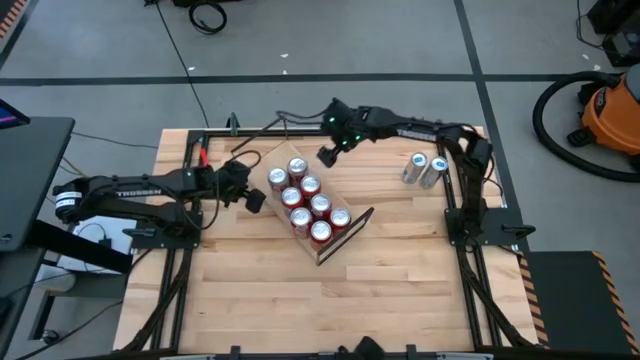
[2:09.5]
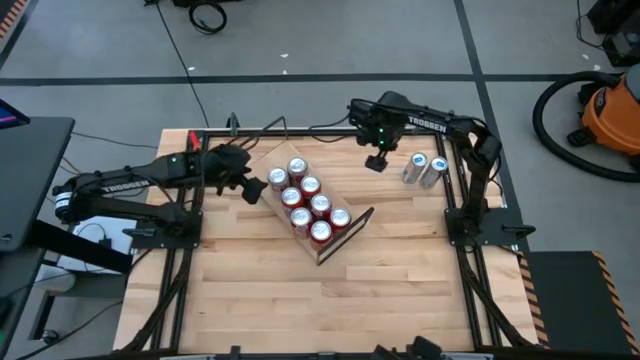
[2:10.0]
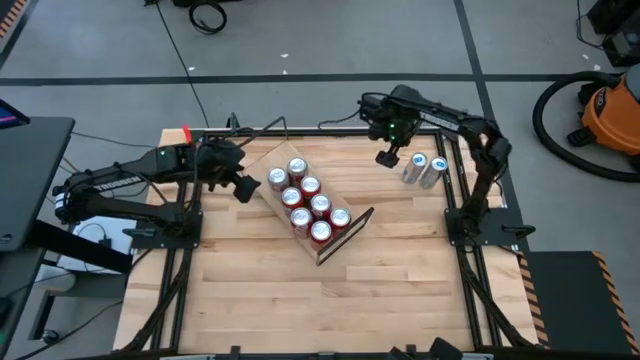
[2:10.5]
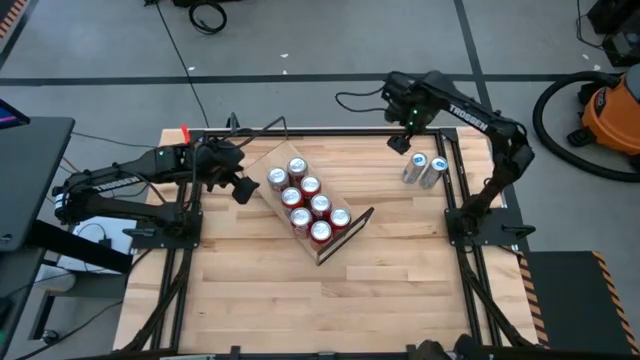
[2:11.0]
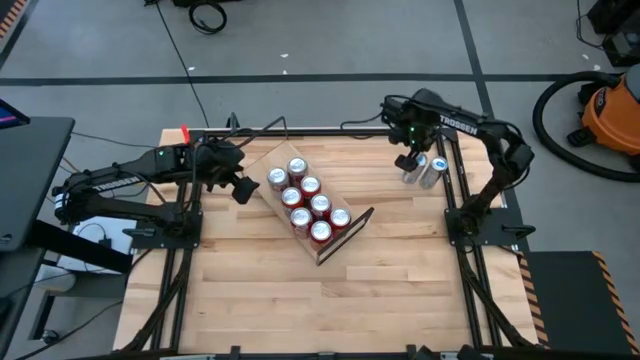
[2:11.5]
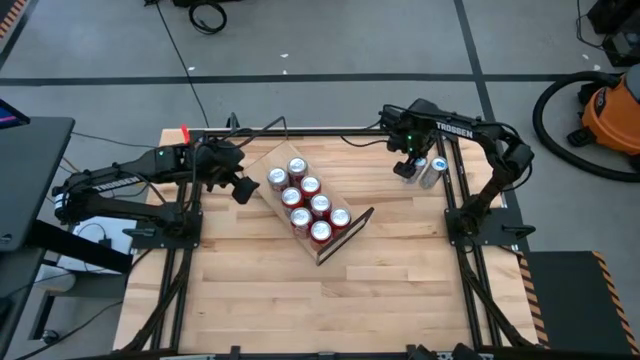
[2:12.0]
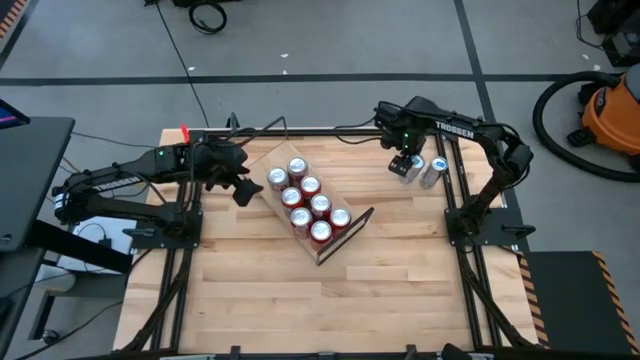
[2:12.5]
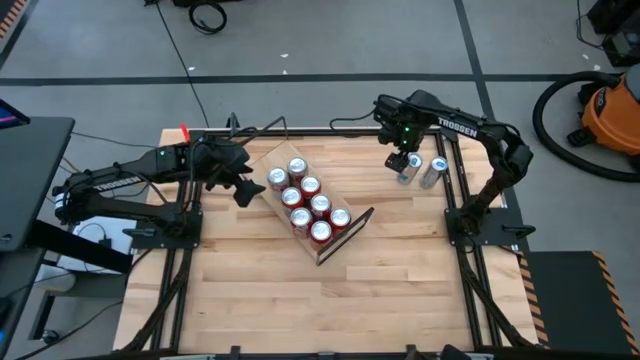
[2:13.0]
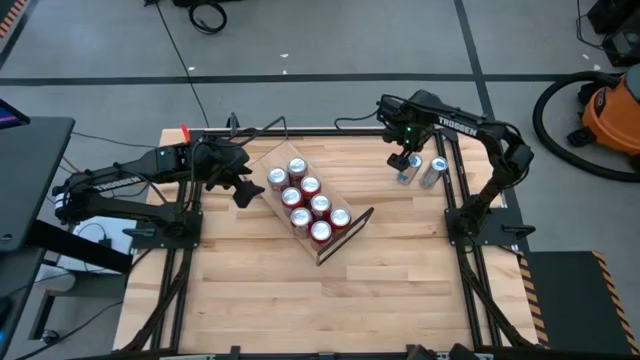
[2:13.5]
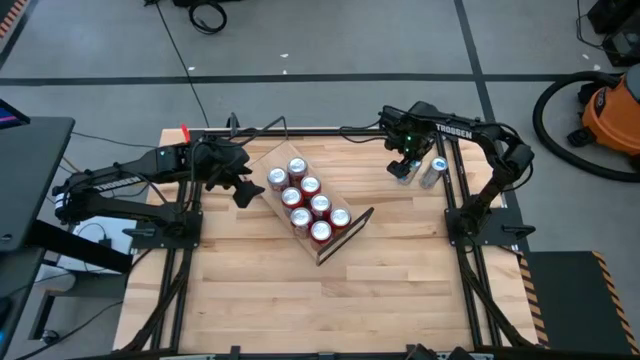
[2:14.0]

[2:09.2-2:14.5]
Task: Place canned beverage on shelf
Put the left blue soda can on the shelf

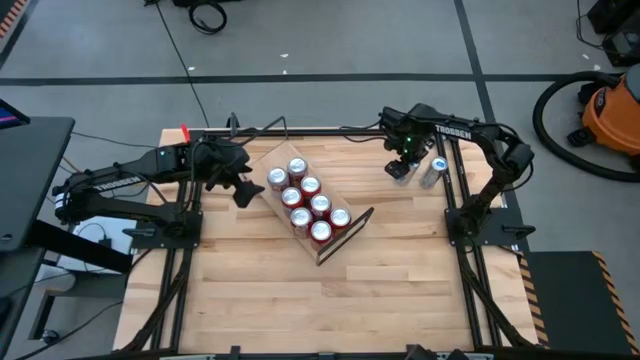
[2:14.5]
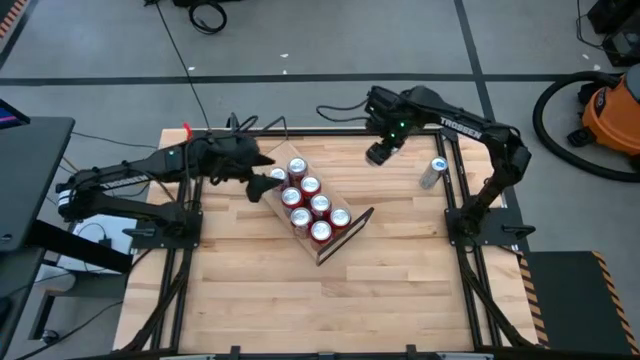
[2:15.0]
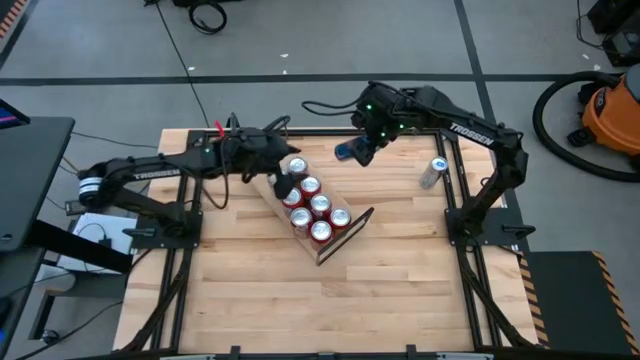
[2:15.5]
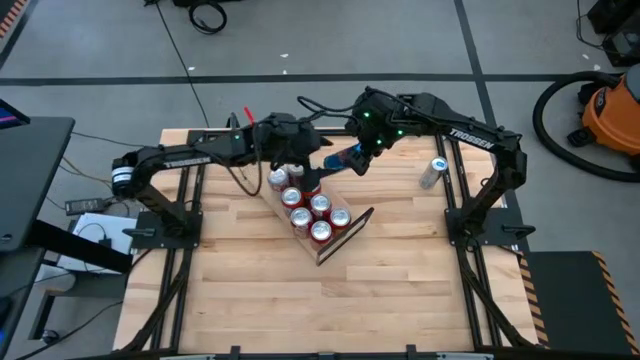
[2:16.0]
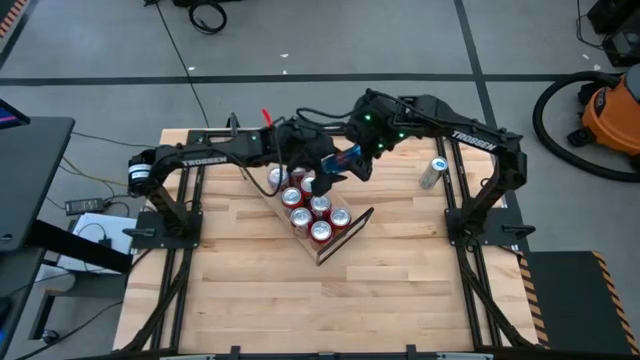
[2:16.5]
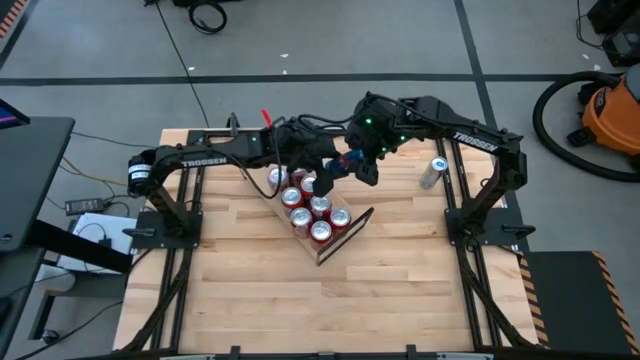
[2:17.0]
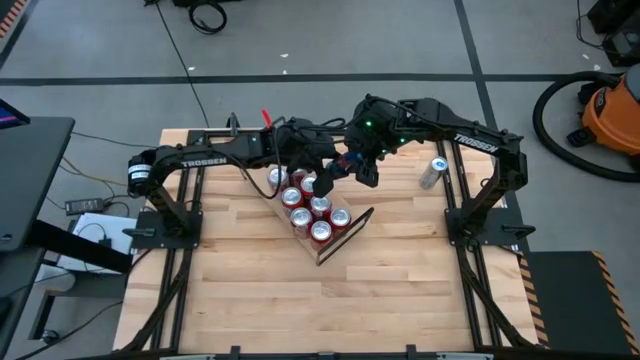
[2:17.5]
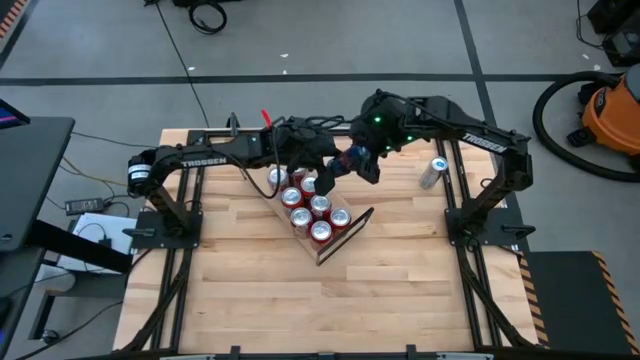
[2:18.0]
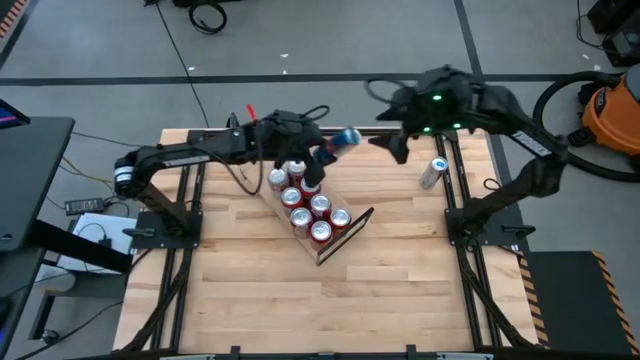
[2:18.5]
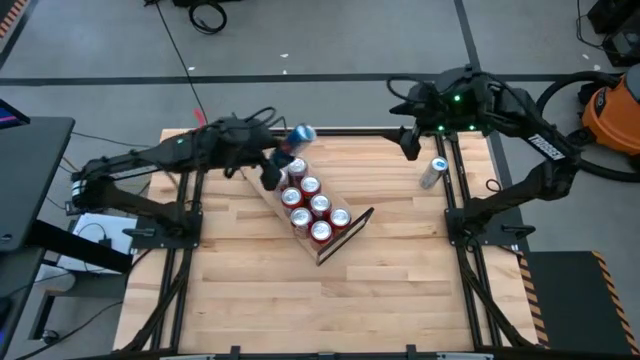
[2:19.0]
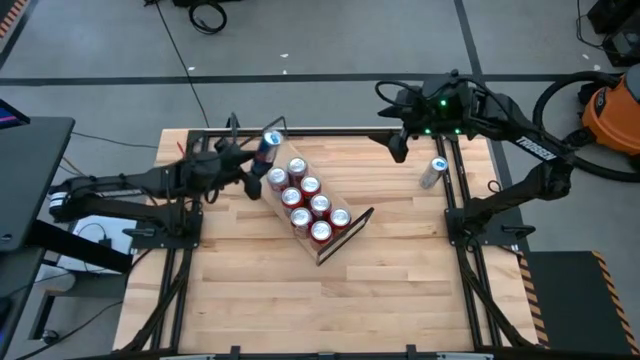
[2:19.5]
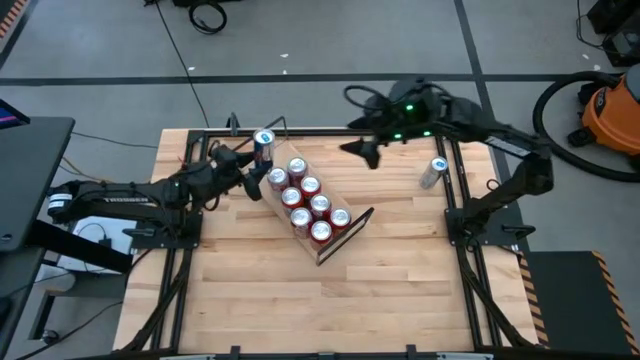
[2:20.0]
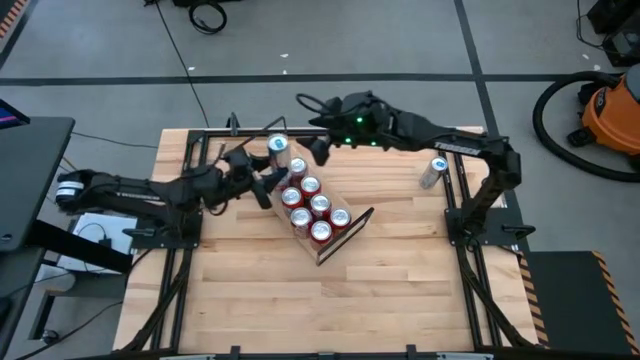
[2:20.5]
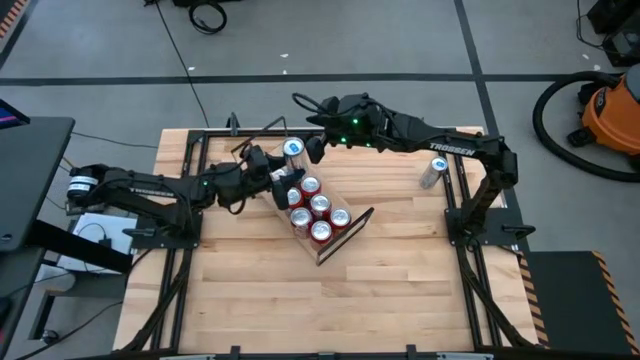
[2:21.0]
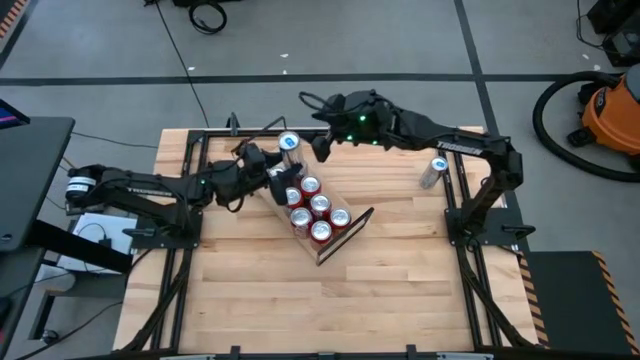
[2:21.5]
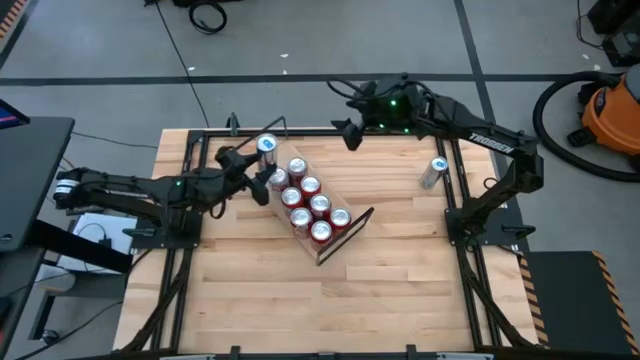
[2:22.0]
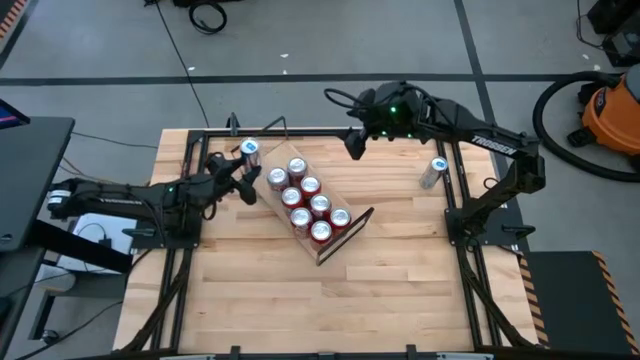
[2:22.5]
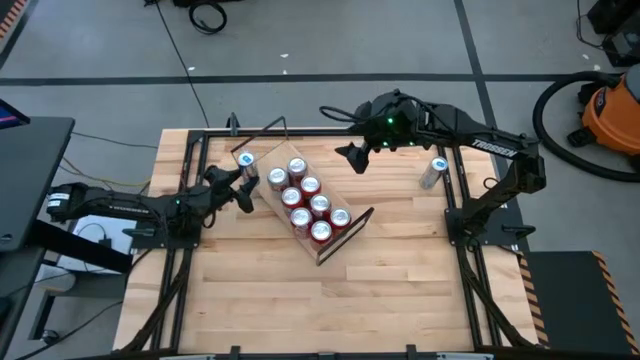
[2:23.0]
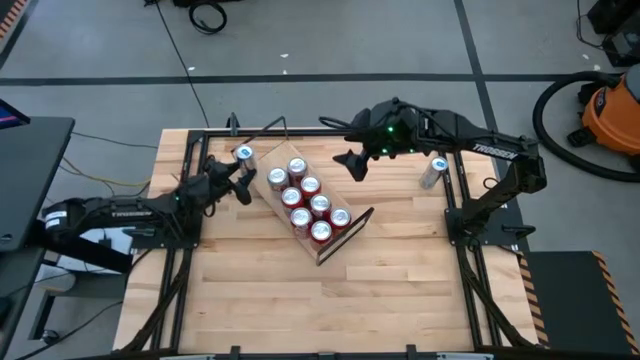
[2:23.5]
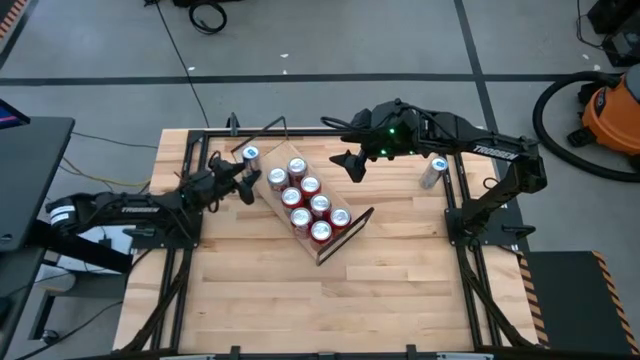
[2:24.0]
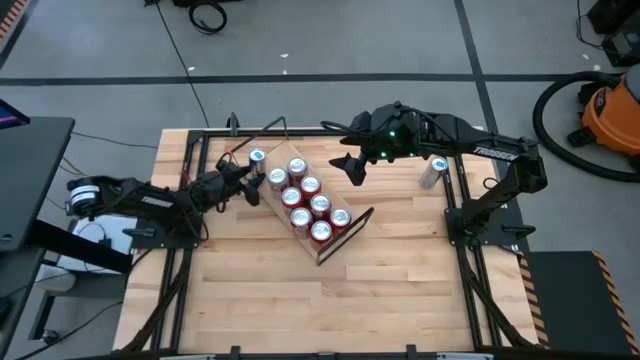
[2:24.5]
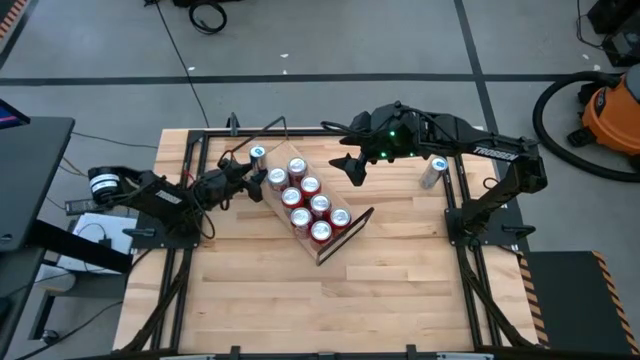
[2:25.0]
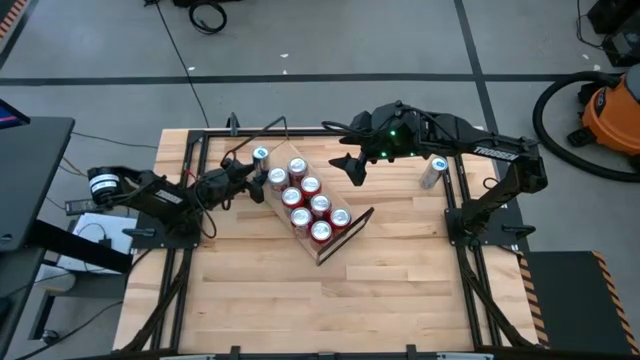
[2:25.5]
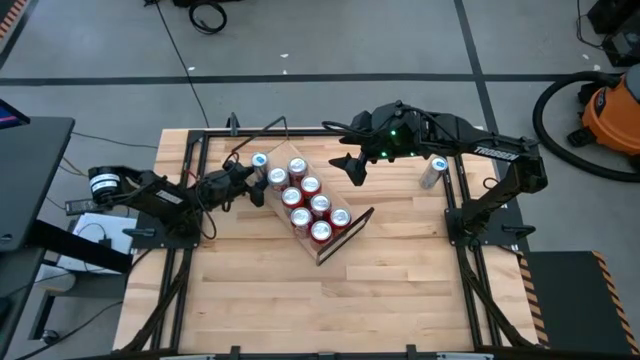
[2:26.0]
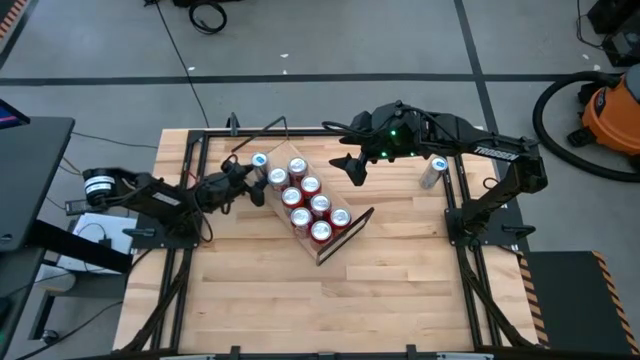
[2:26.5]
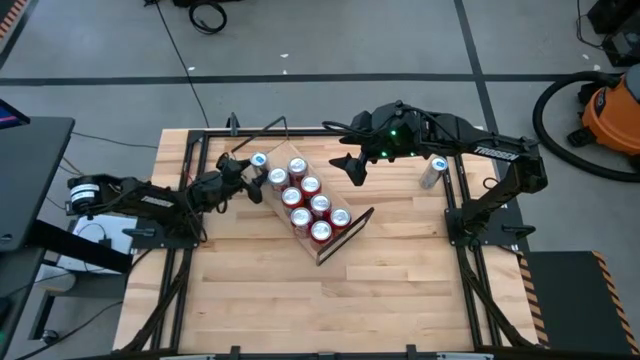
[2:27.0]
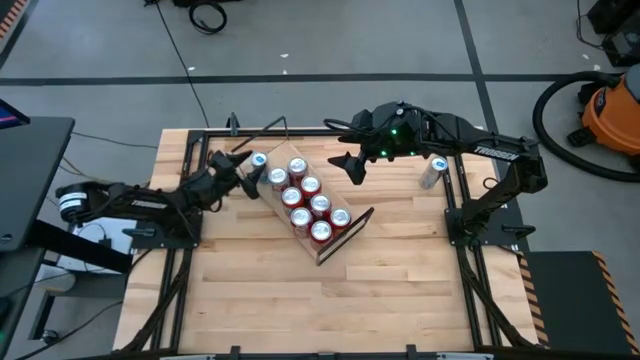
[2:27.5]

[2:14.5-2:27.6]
Put the left blue soda can on the shelf

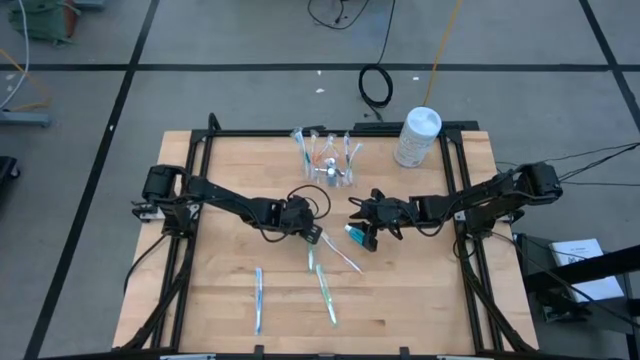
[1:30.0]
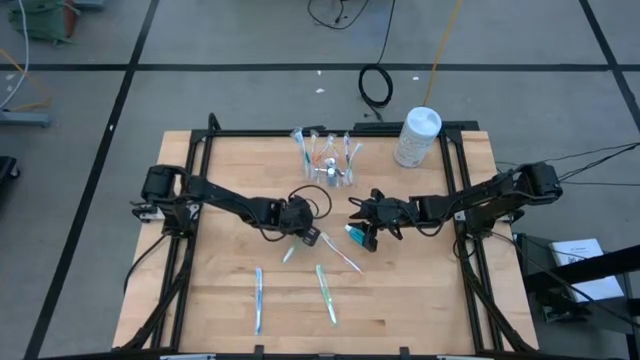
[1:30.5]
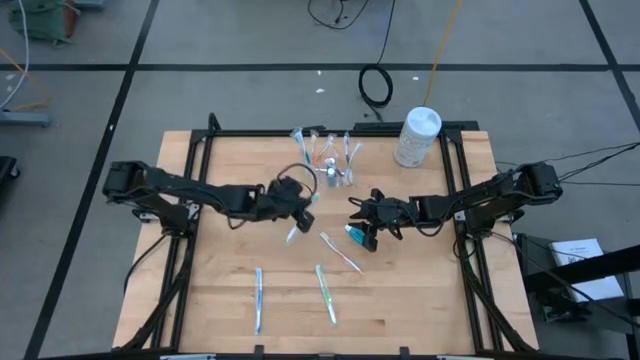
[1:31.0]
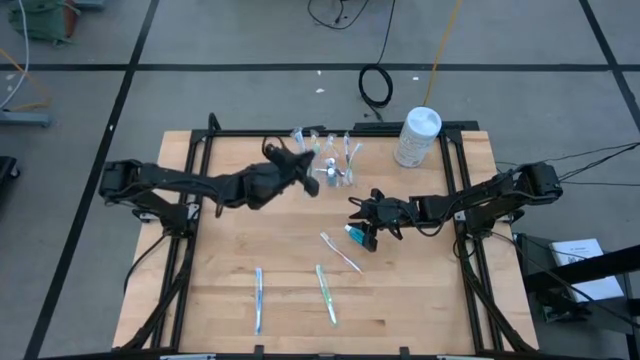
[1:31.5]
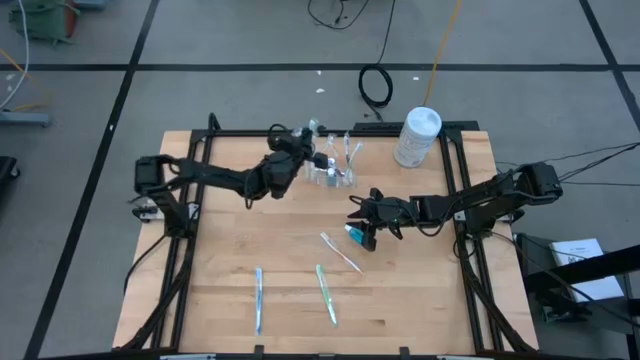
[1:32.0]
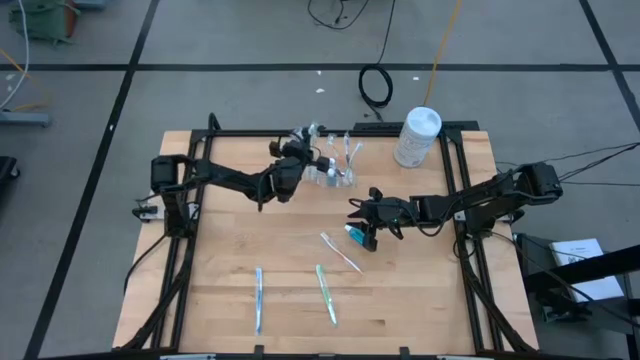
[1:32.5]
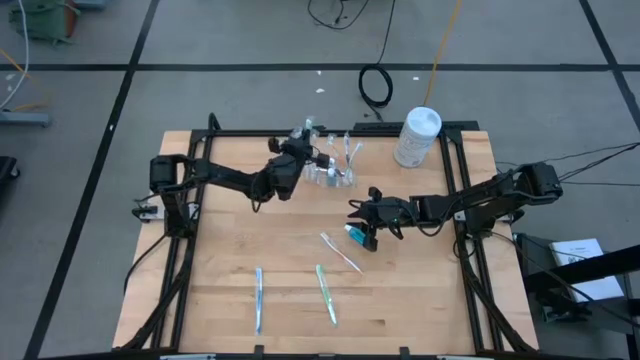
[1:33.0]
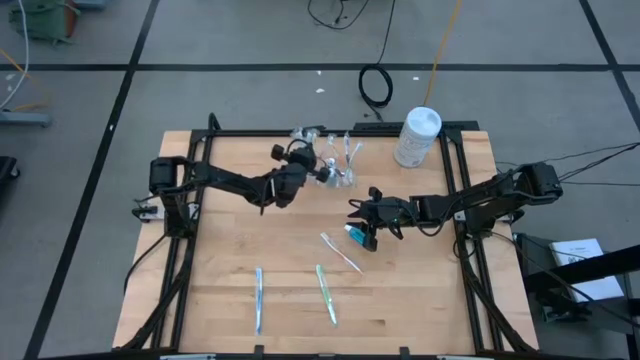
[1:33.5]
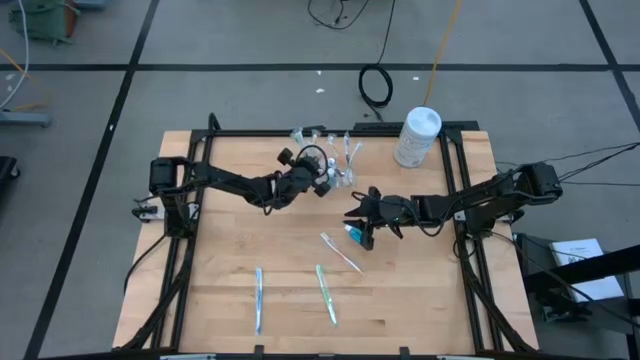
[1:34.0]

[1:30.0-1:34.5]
Task: Pick & Place toothbrushing station
Put the green toothbrush into the transparent organizer
